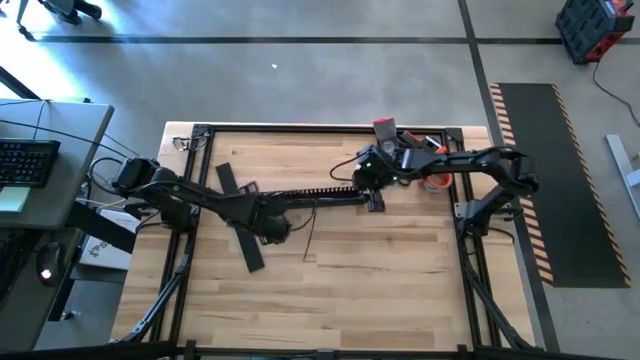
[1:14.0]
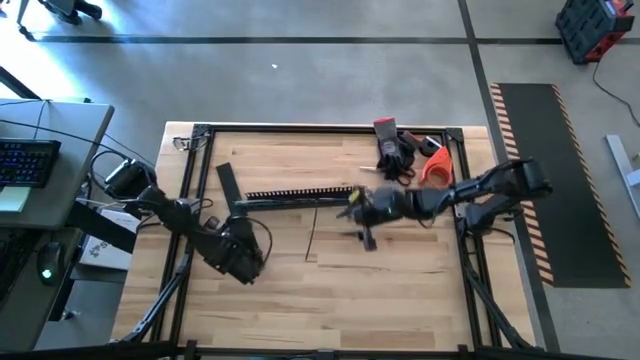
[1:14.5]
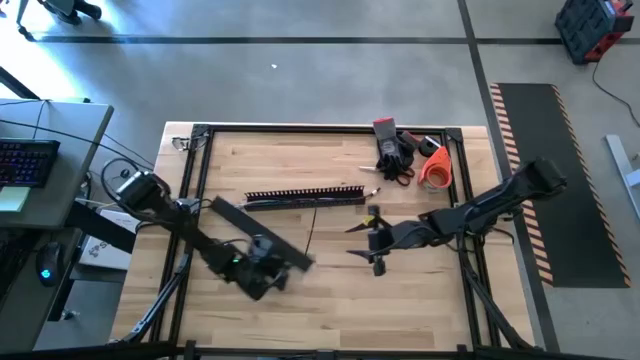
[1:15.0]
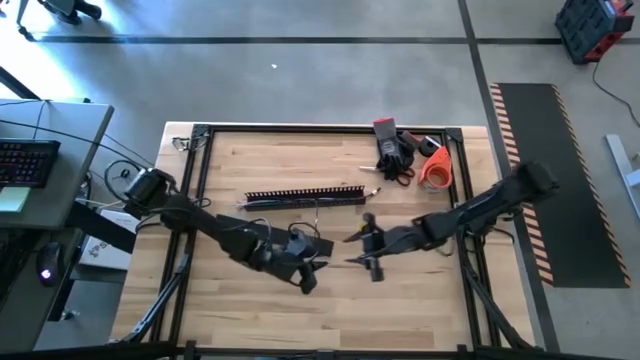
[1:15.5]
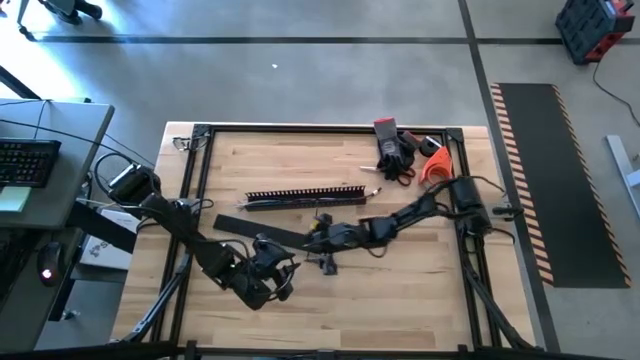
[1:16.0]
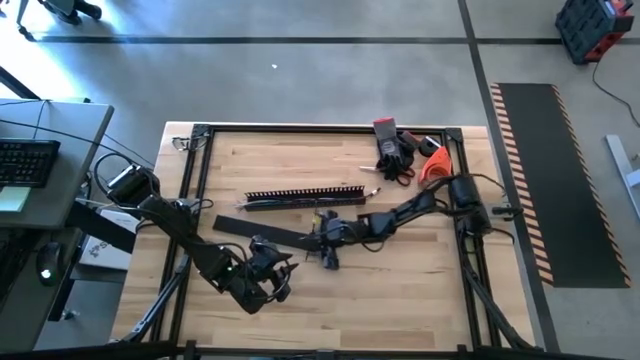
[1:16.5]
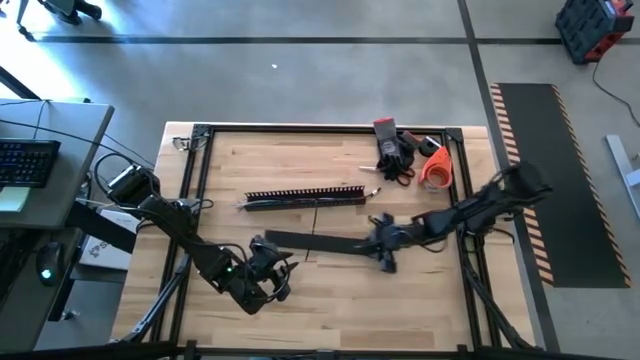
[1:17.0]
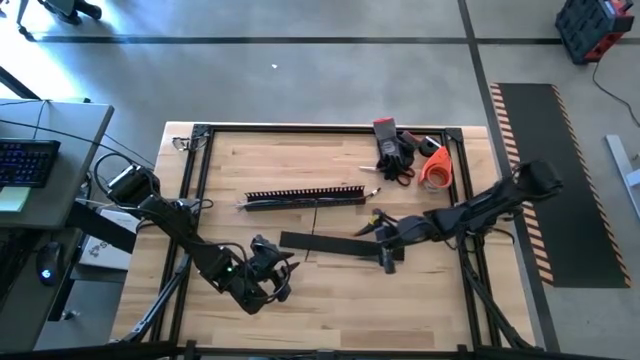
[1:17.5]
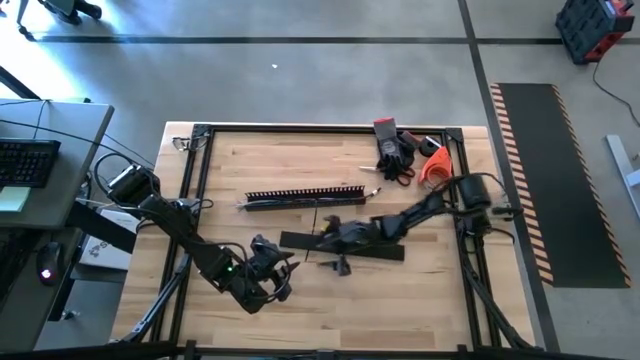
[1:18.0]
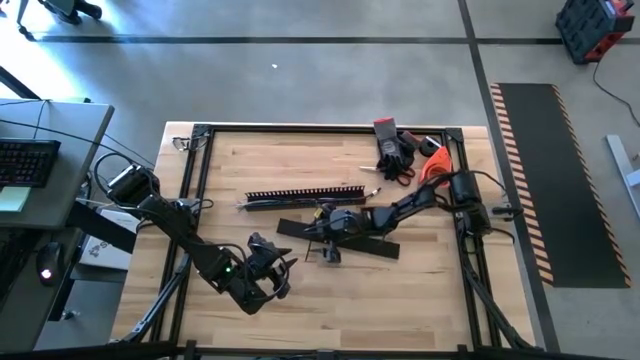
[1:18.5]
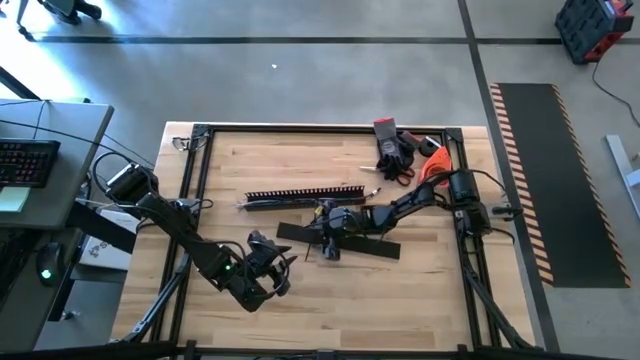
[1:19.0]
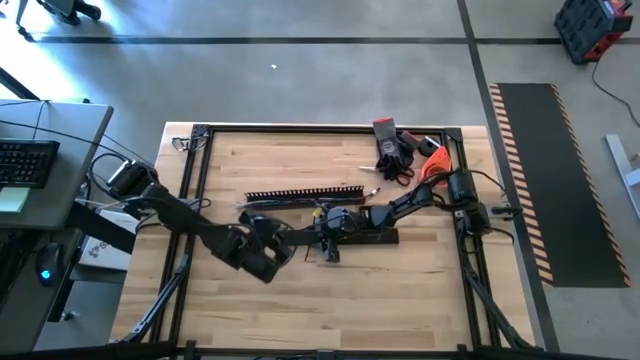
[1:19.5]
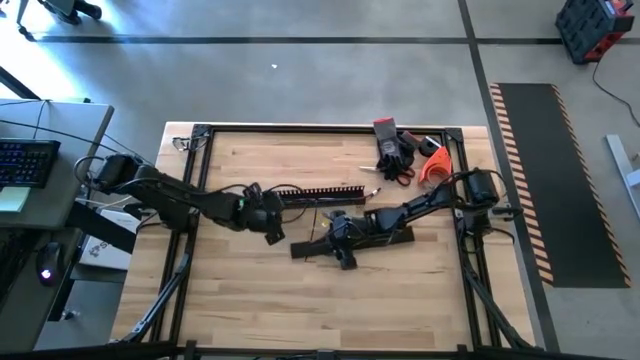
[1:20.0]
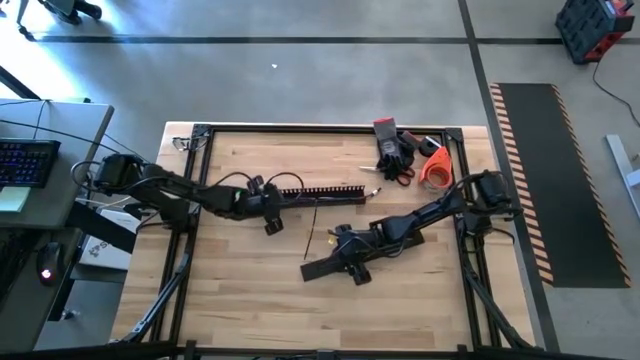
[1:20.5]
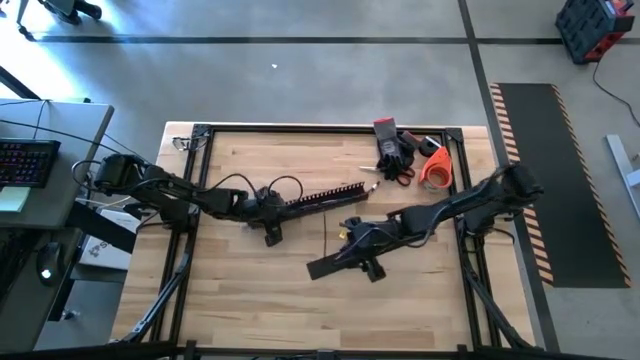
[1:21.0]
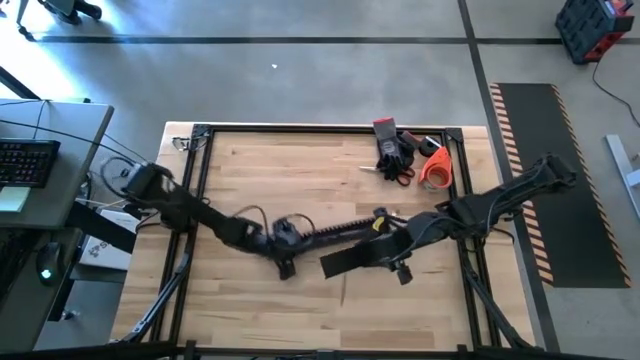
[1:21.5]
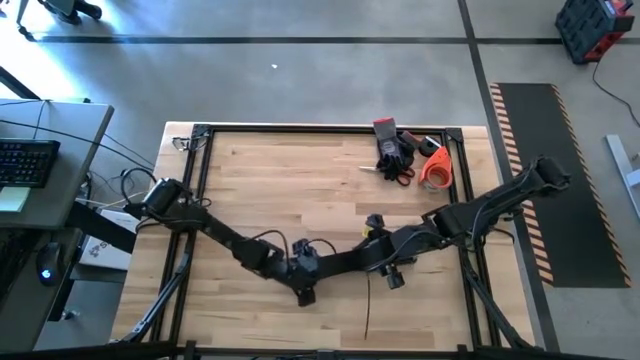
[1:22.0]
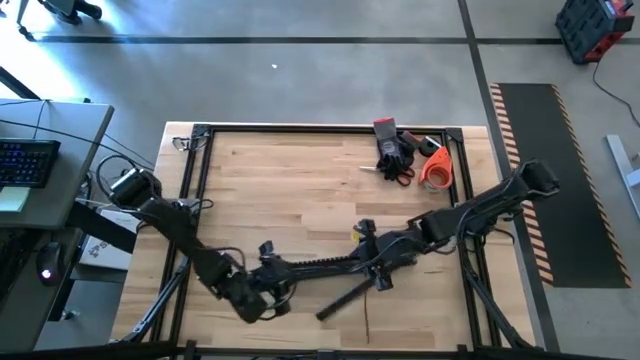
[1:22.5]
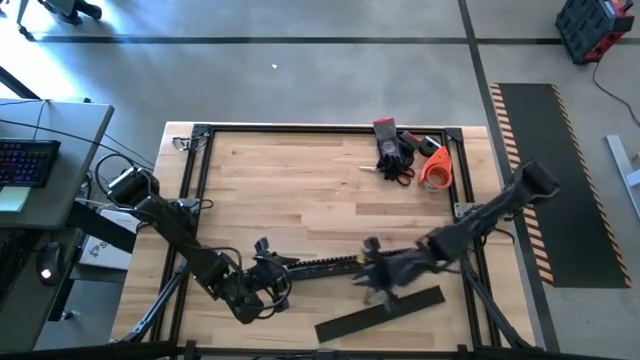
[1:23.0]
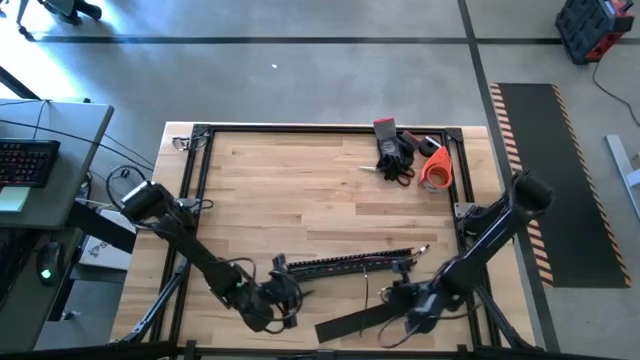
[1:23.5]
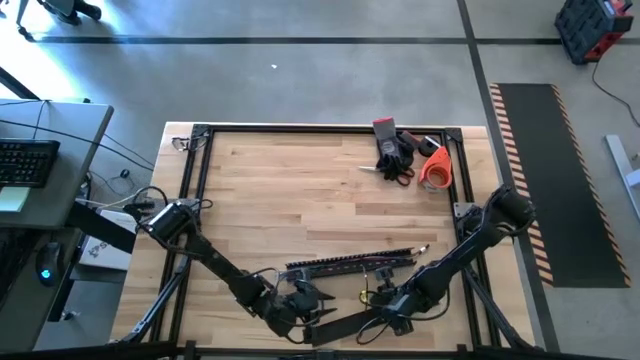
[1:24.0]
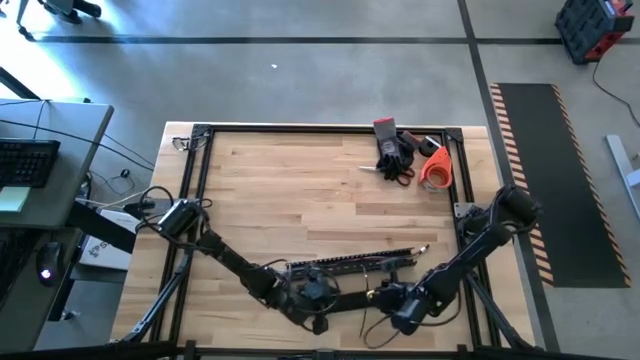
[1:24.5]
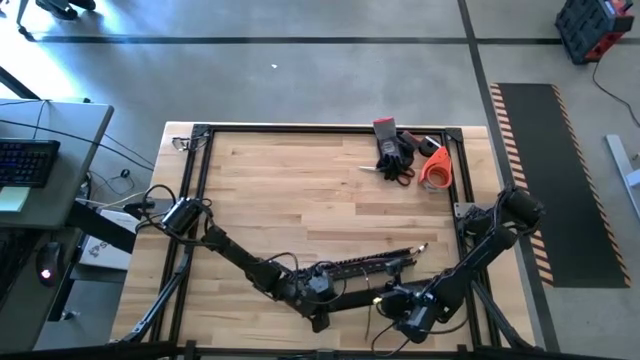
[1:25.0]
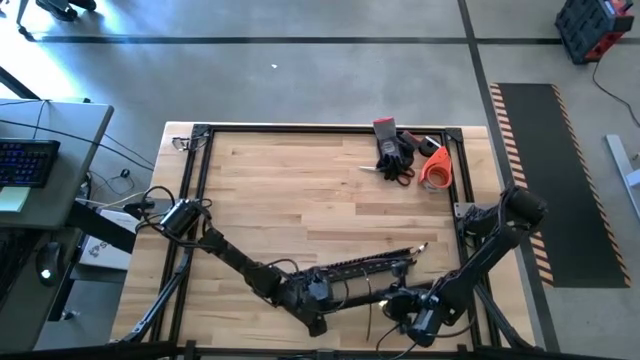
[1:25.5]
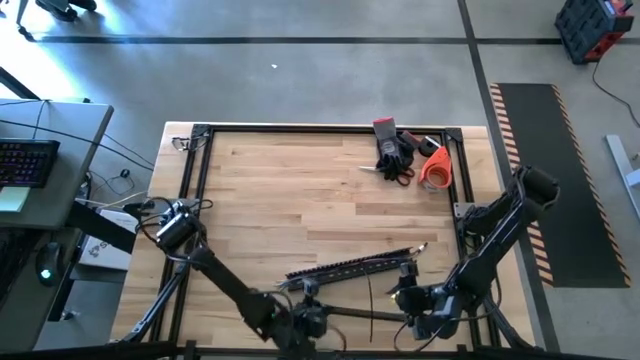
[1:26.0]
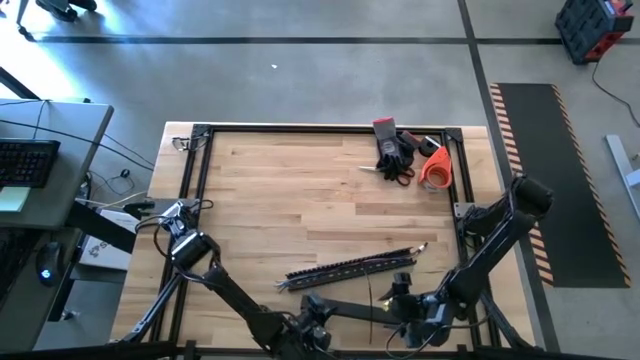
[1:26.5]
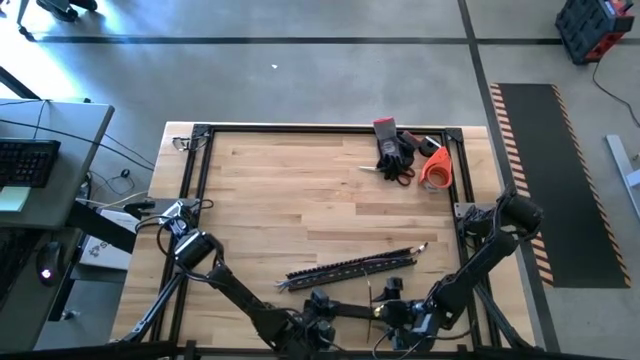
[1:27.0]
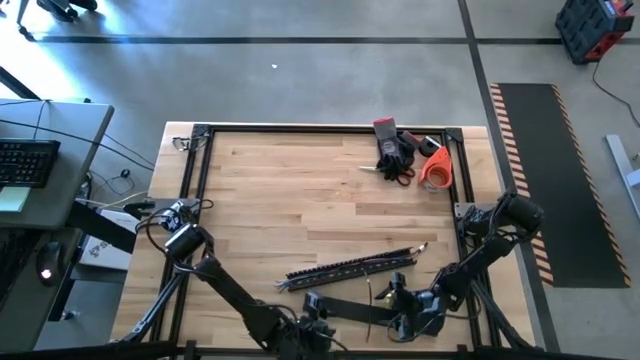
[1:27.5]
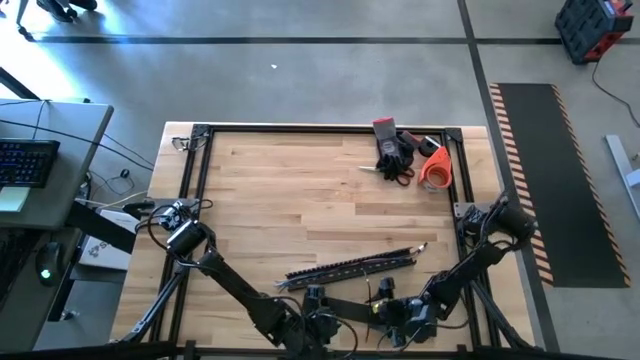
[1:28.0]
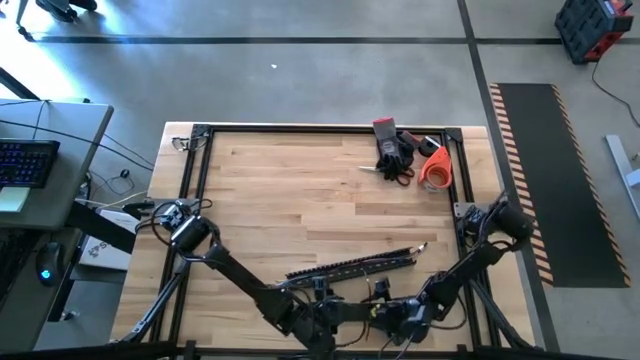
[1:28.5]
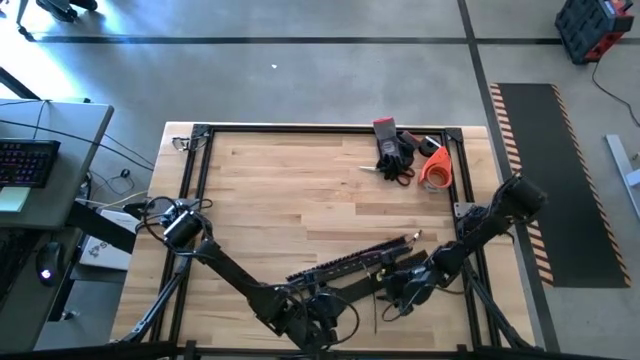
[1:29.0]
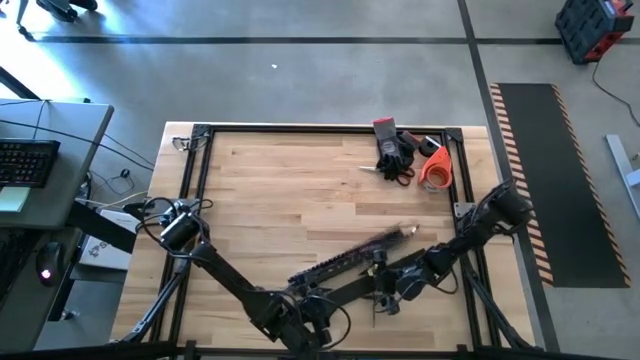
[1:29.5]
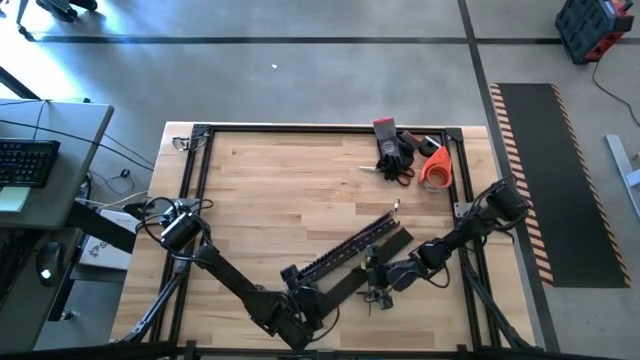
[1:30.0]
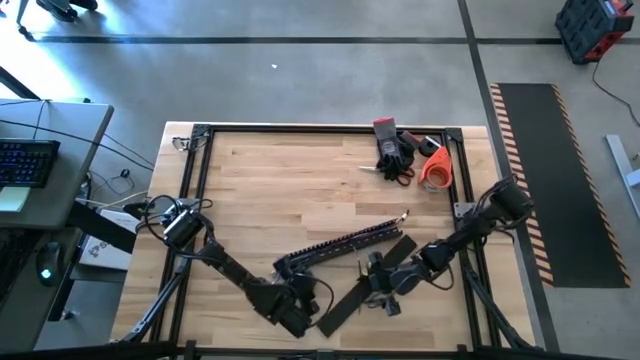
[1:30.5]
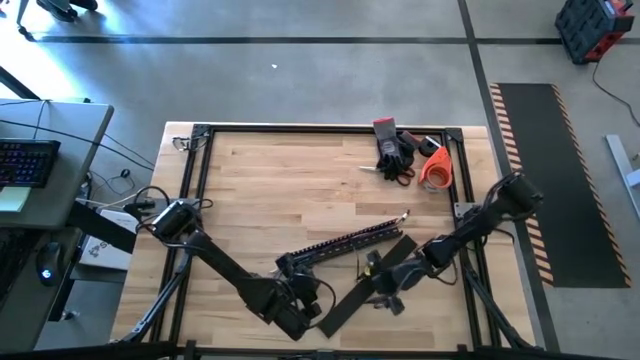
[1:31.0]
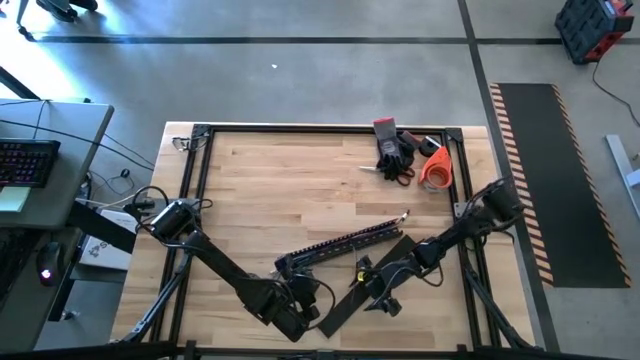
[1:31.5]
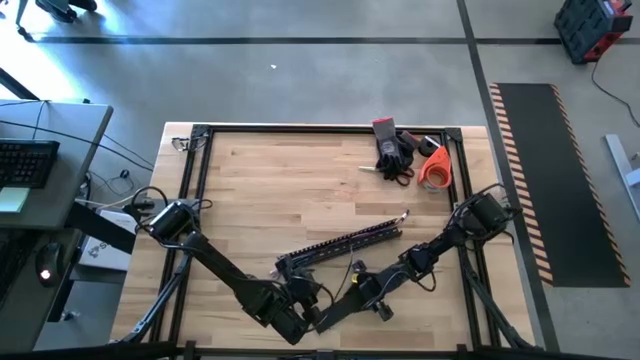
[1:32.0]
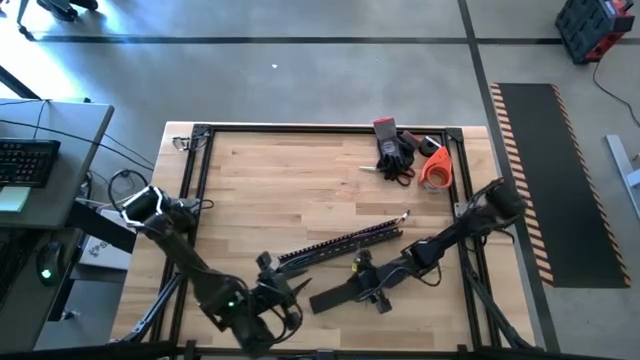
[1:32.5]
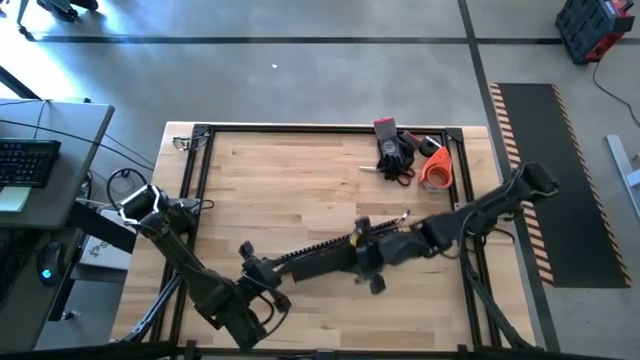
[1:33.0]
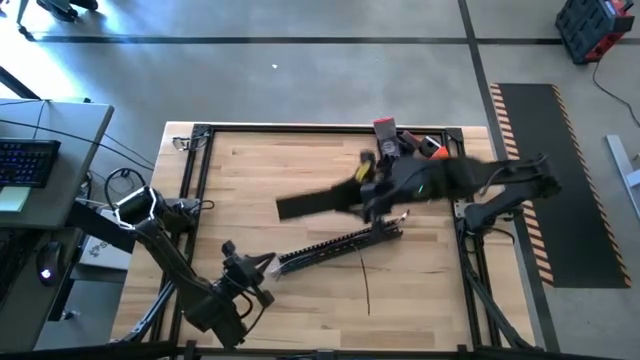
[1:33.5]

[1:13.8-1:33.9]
Task: Ziptie cables
Close the black cable duct with the black cable duct cover
